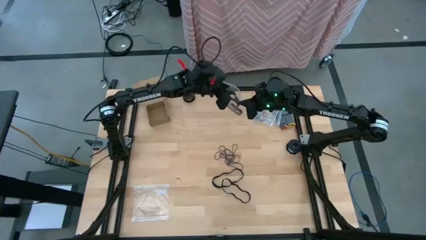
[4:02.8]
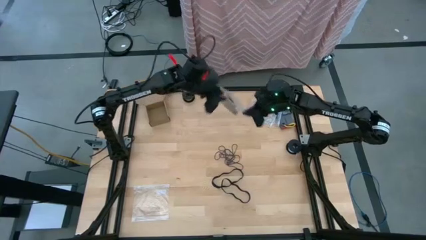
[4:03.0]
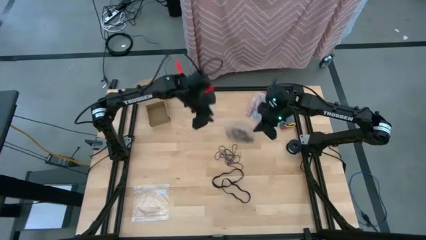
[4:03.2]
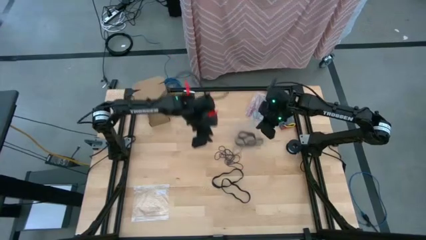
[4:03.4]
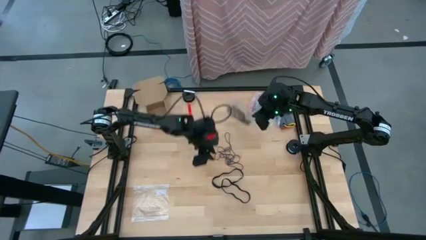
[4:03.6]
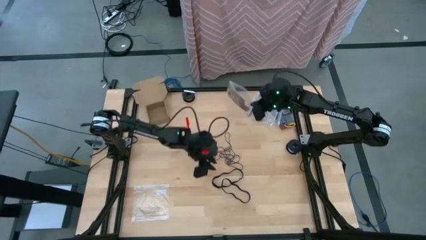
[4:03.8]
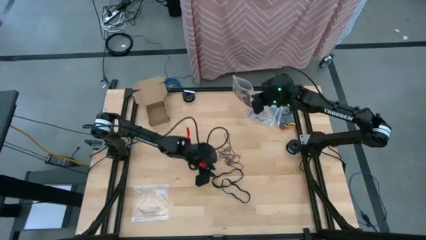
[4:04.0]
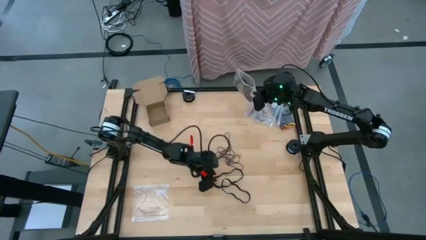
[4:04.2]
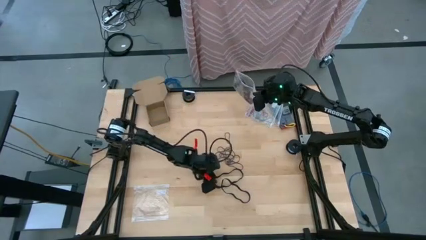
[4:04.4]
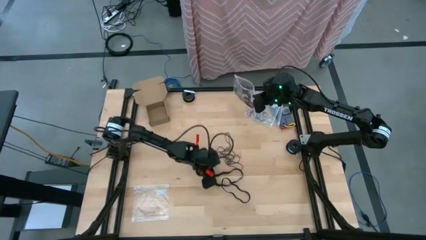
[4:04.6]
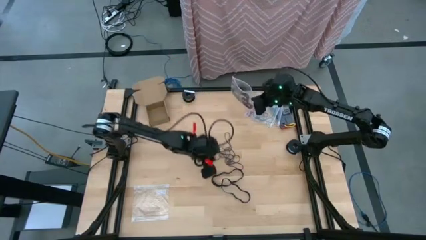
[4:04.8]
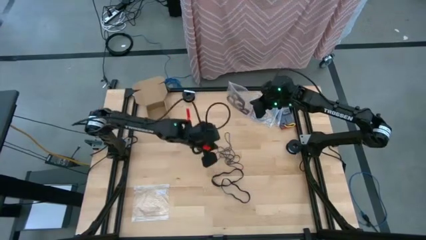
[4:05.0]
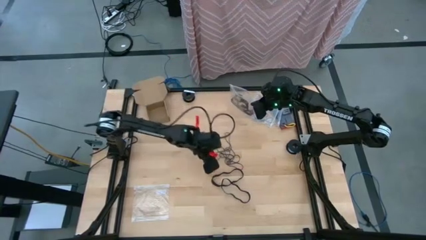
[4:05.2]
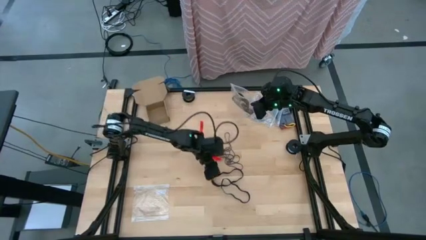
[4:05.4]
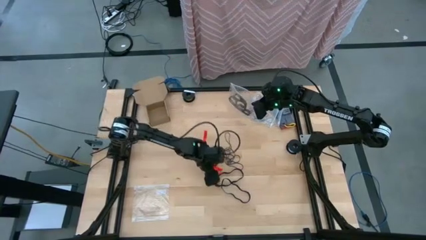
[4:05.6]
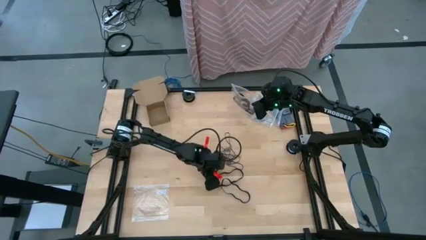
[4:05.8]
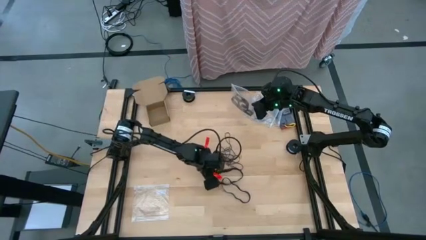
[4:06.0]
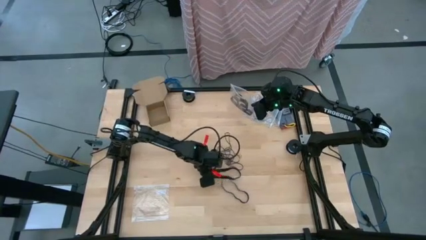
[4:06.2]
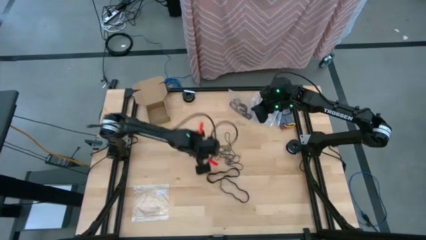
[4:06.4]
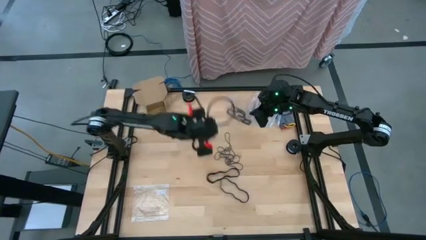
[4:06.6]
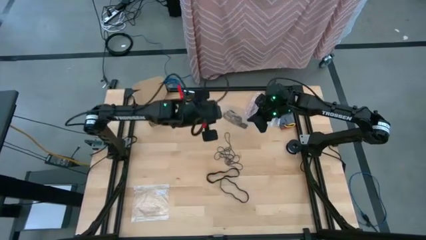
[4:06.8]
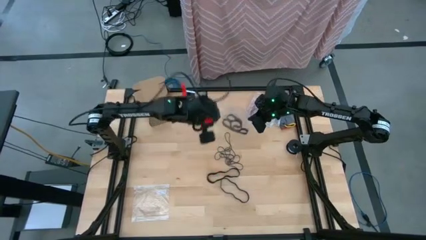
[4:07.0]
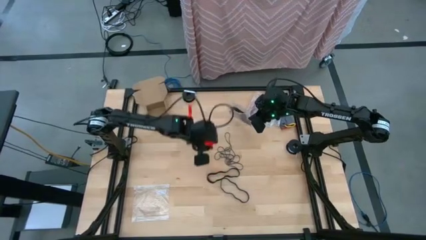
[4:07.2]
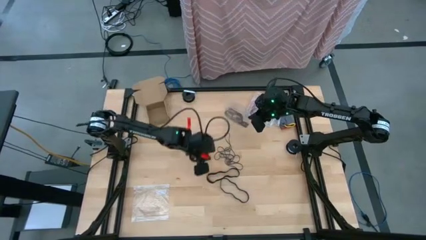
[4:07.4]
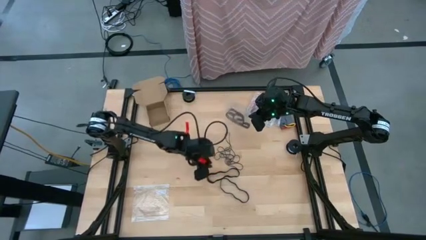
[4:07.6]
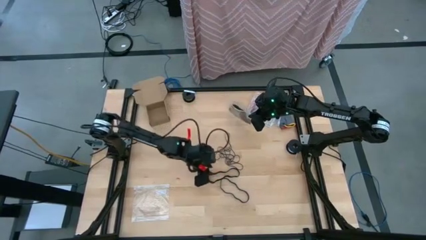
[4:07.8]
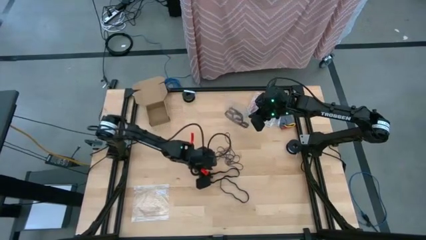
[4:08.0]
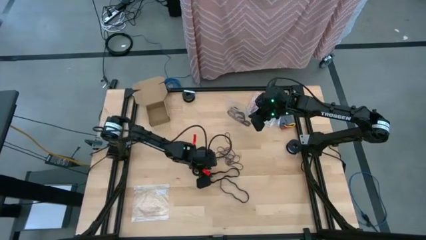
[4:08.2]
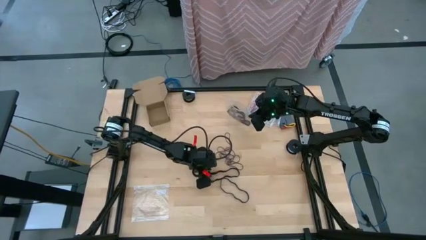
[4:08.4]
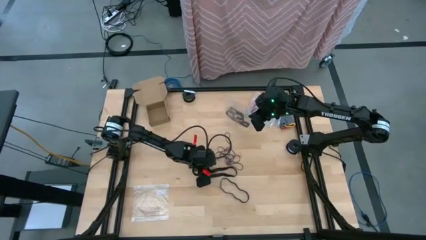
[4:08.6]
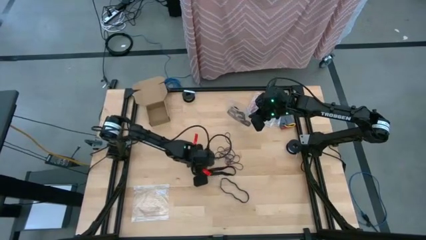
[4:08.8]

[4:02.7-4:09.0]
Task: Sort rubber bands
Put the black rubber band into the transparent zip bag

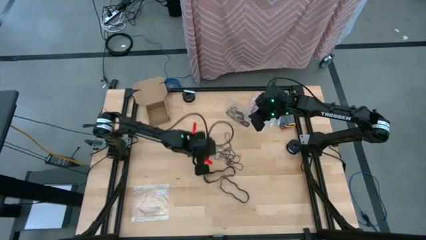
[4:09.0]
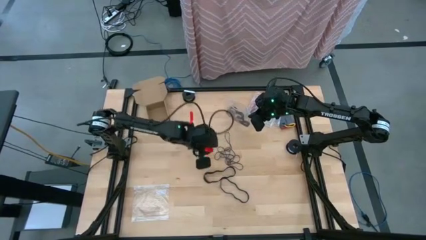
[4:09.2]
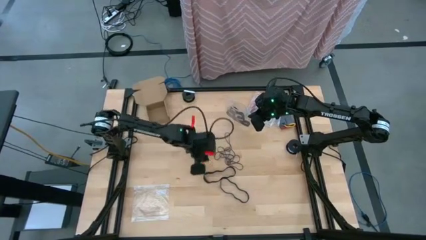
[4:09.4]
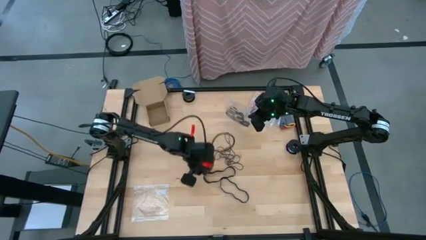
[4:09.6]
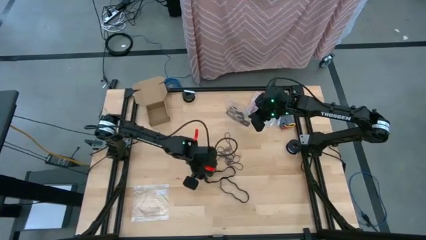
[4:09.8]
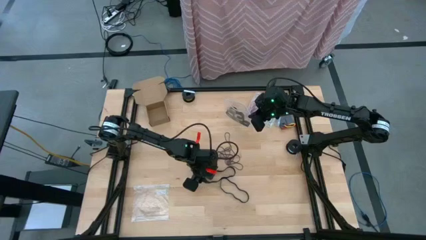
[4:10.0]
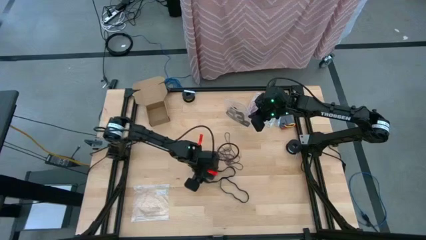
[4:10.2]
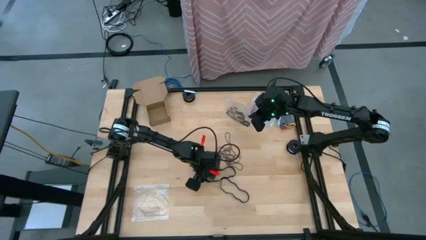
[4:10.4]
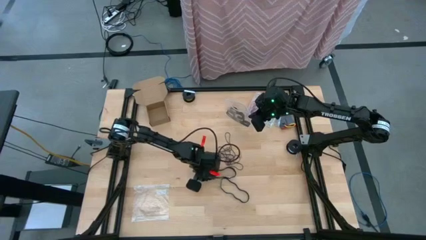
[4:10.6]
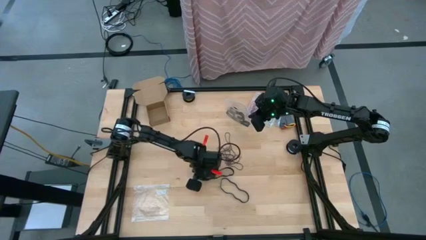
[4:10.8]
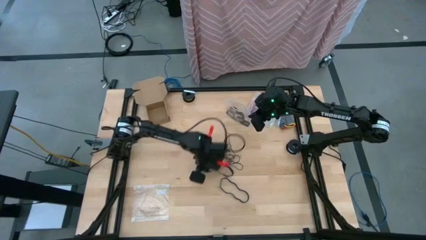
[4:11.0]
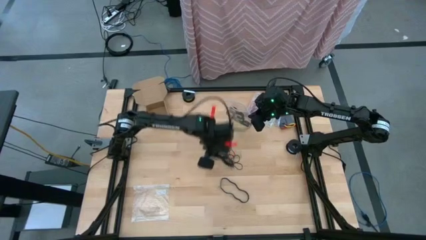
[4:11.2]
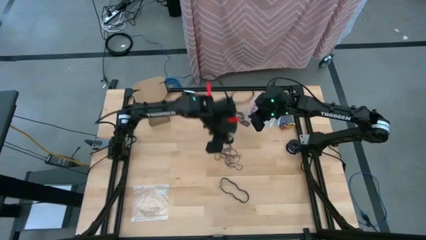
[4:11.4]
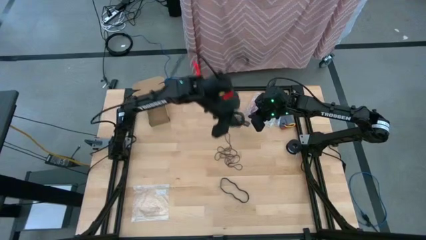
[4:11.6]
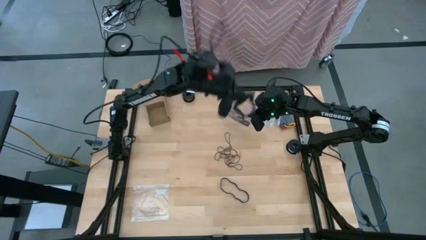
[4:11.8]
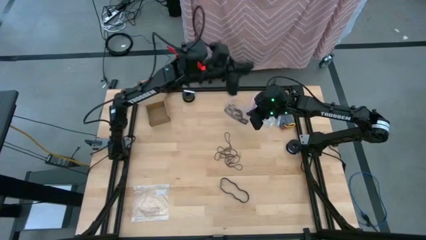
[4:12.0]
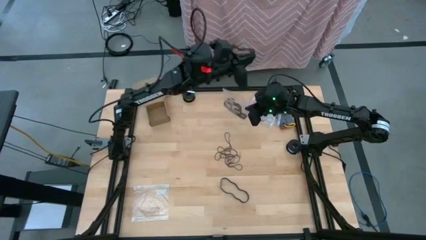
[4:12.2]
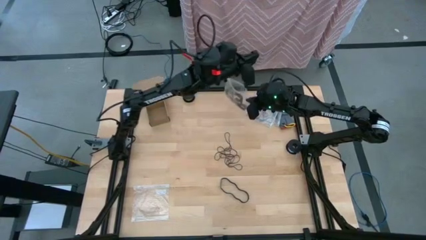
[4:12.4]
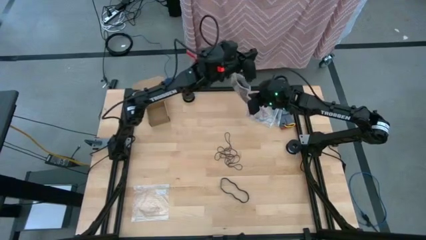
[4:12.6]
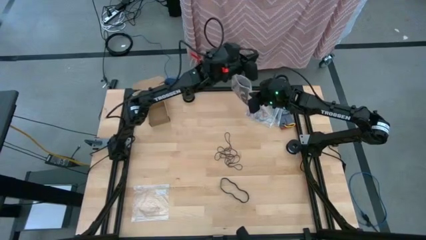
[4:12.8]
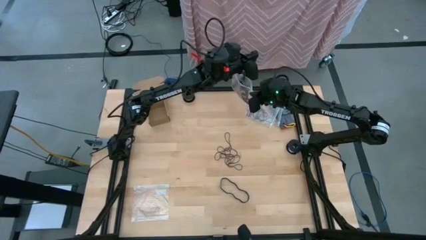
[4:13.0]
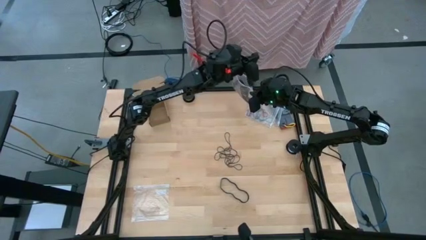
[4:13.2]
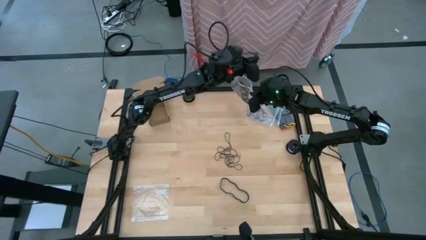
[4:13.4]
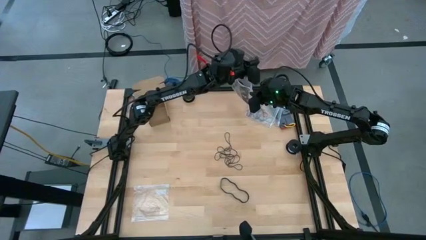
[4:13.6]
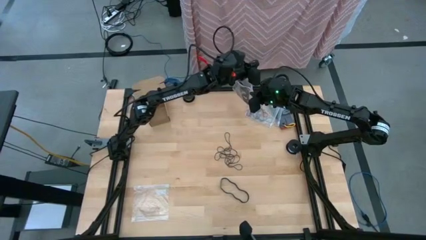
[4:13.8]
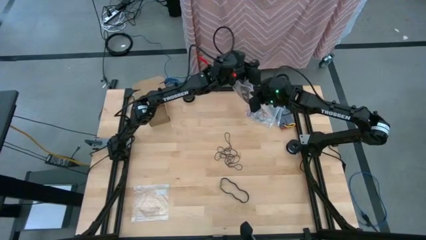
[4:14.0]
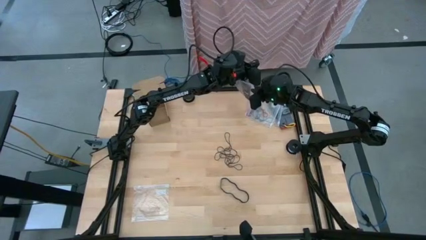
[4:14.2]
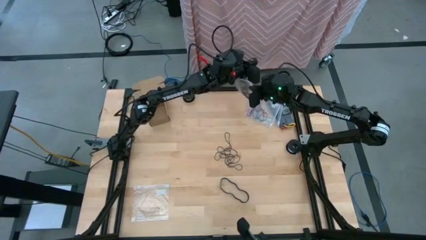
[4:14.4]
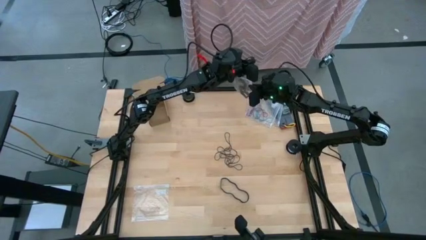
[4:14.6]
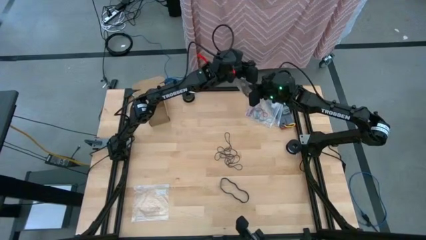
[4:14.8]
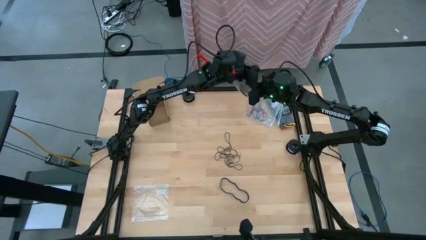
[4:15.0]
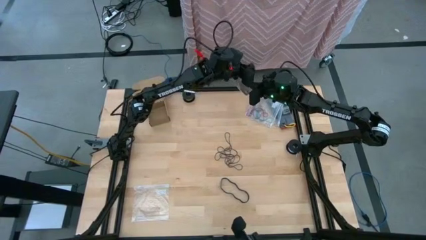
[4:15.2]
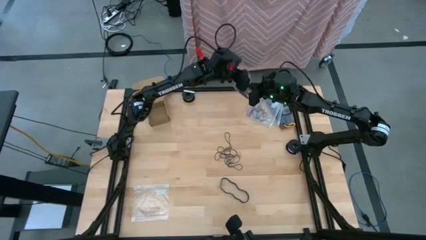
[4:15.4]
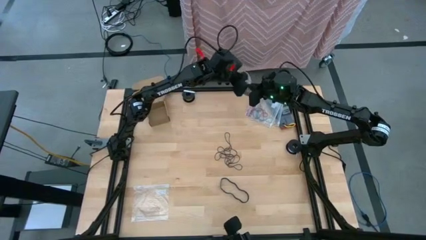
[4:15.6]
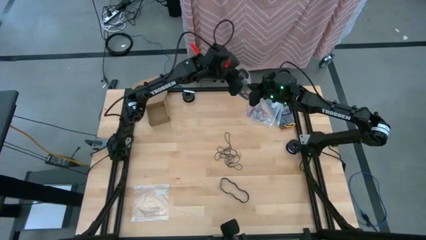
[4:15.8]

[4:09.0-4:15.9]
Put the black rubber band into the transparent zip bag

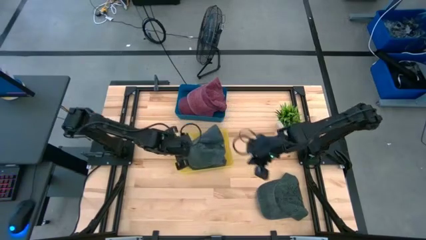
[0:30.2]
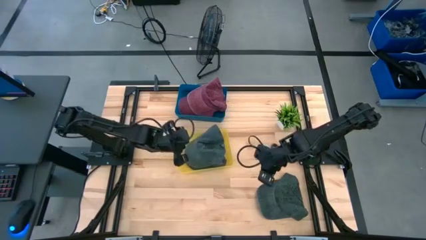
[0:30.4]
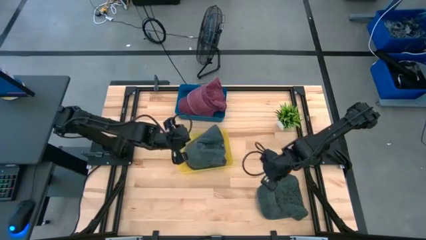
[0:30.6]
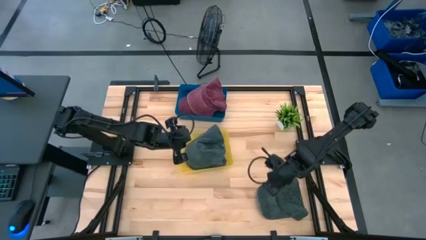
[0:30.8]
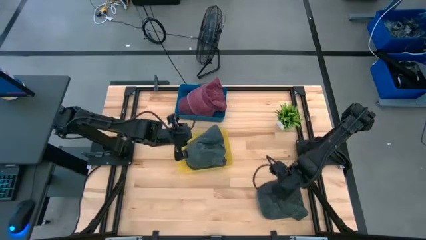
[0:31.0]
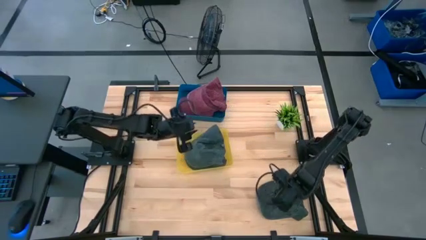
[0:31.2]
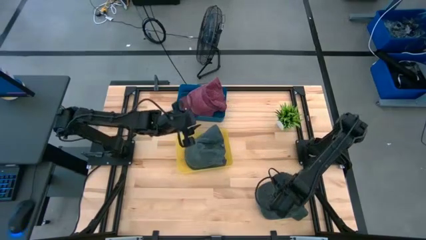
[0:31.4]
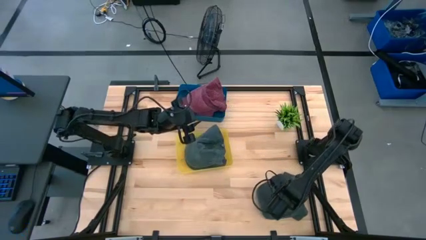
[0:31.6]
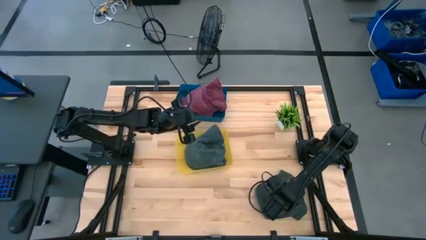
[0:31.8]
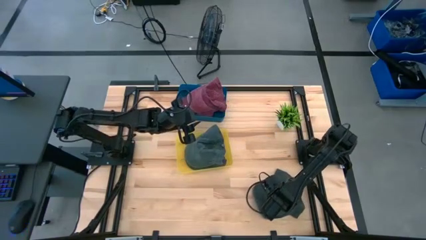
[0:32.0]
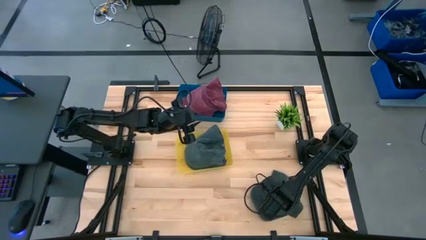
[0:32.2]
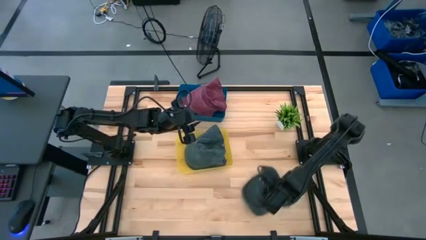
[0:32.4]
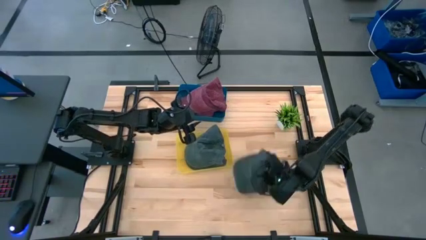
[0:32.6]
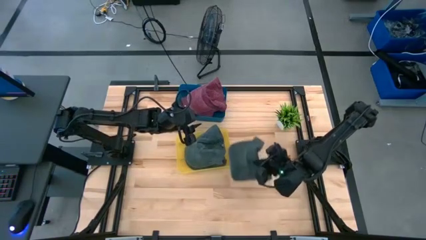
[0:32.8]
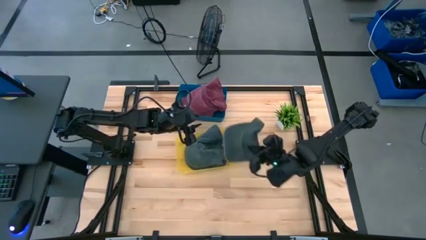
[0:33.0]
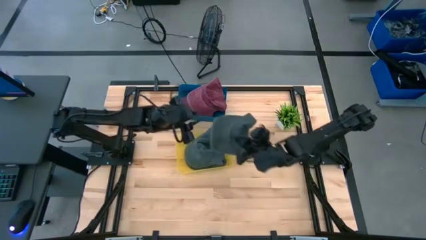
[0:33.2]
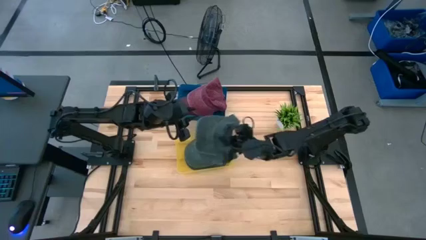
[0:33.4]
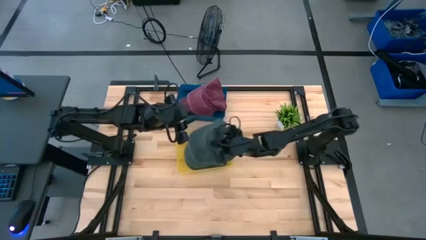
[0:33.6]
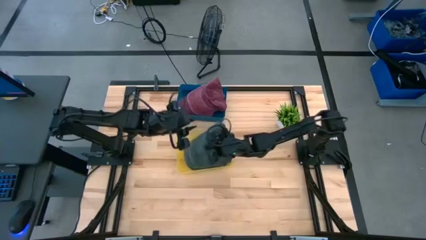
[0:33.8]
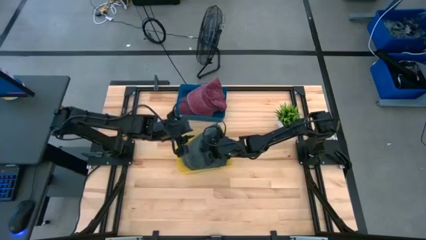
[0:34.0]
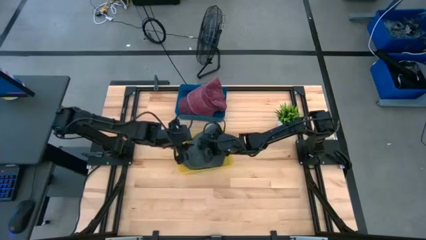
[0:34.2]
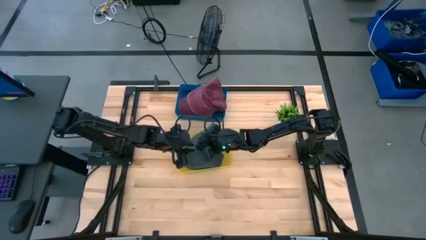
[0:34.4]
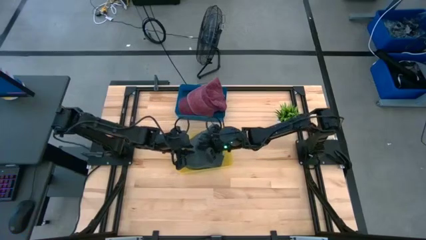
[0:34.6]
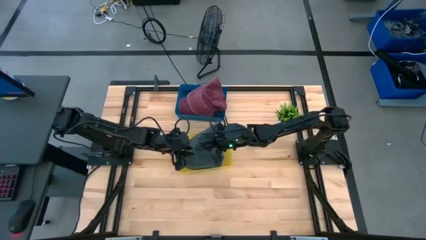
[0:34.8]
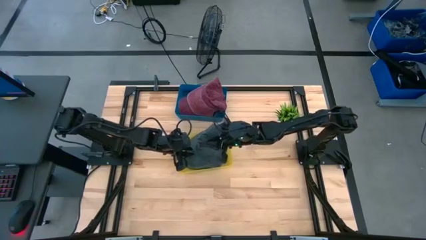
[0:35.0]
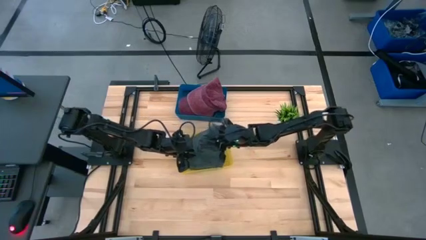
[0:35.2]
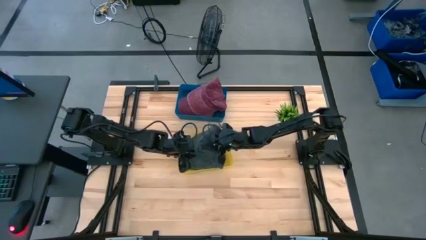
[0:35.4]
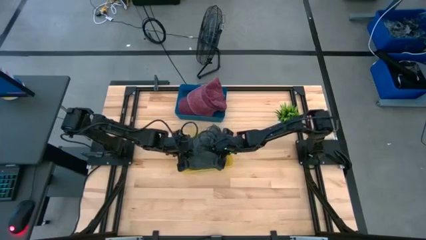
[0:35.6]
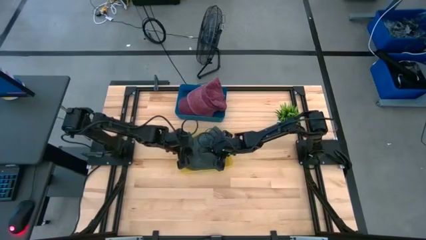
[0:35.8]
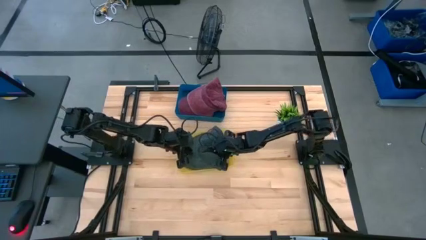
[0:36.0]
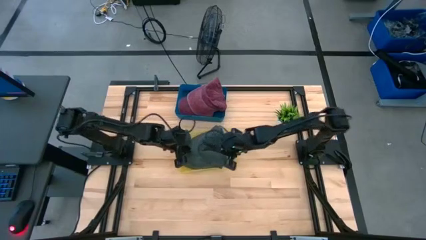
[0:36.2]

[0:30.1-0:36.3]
Task: Pick & Place hat
Put the grey cap into the yellow bin
